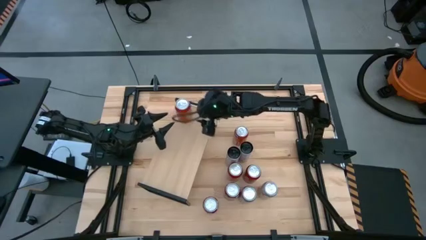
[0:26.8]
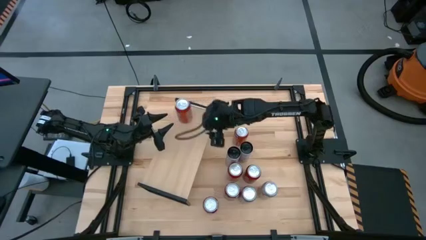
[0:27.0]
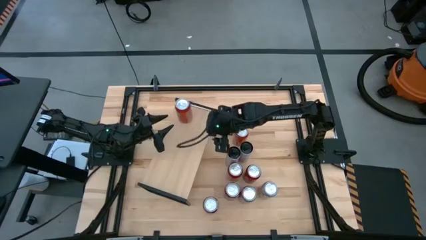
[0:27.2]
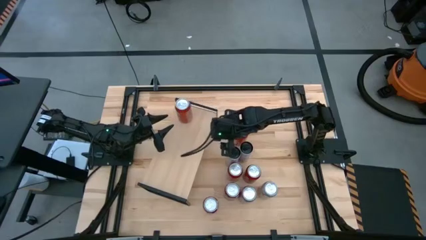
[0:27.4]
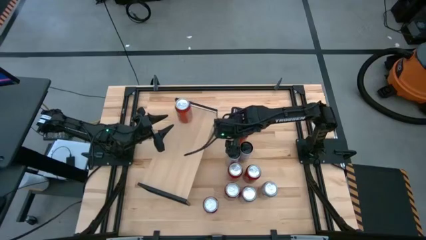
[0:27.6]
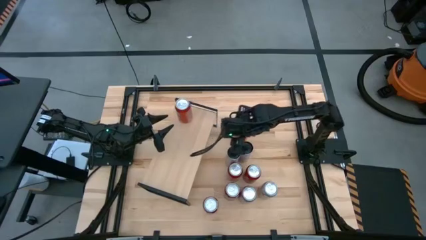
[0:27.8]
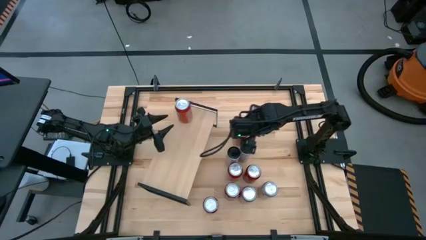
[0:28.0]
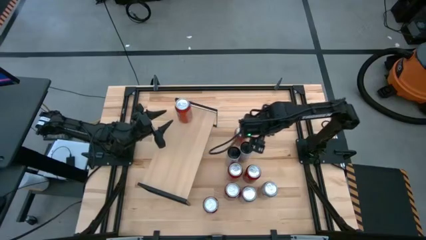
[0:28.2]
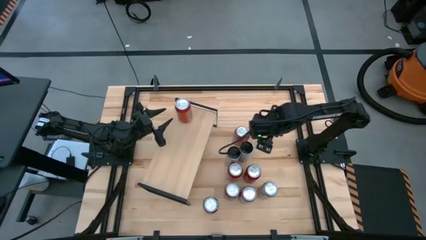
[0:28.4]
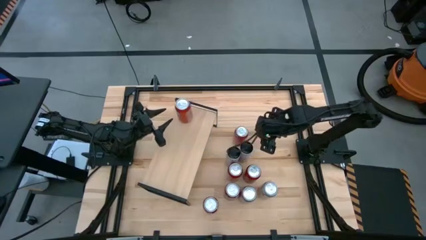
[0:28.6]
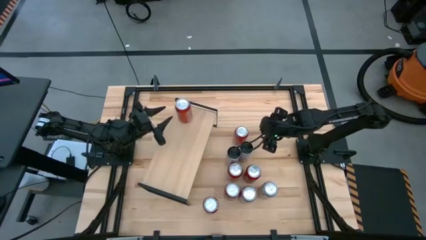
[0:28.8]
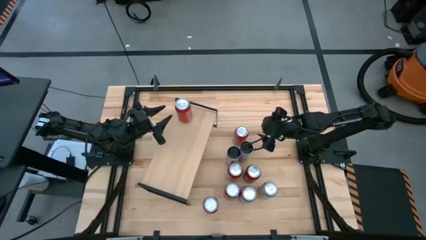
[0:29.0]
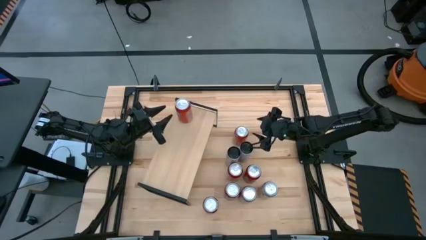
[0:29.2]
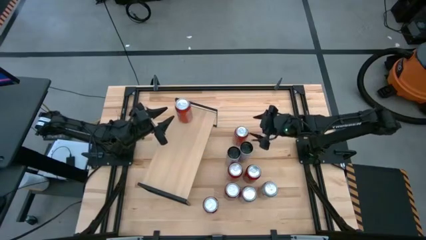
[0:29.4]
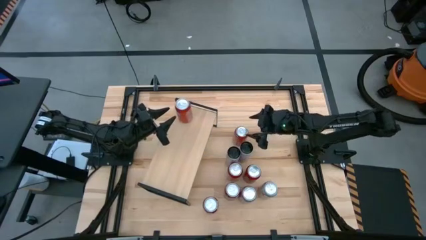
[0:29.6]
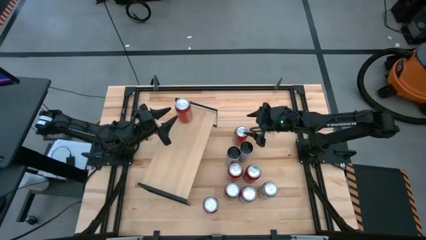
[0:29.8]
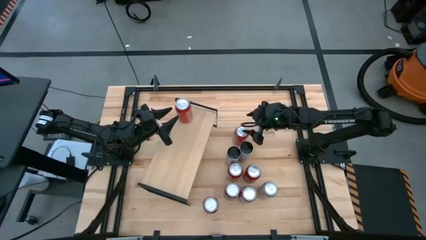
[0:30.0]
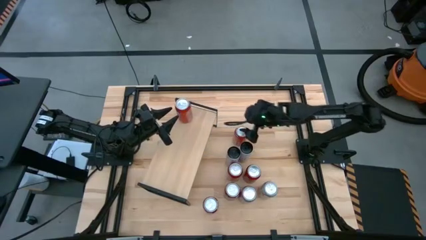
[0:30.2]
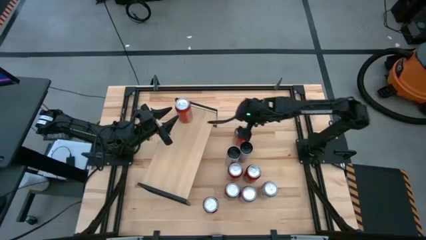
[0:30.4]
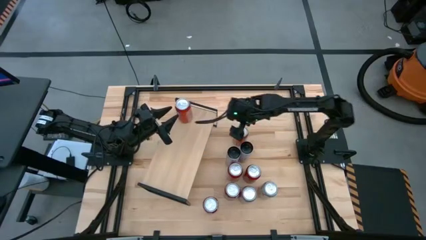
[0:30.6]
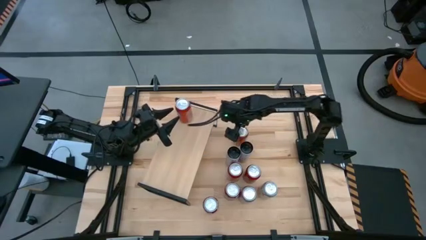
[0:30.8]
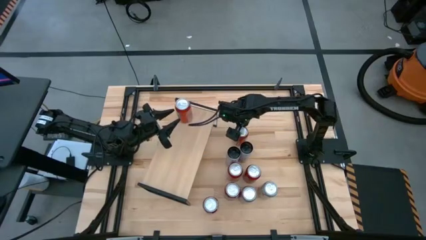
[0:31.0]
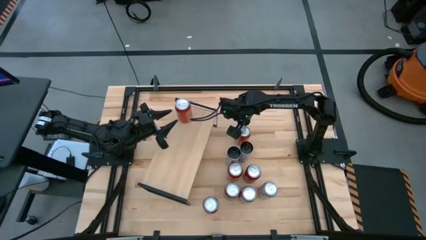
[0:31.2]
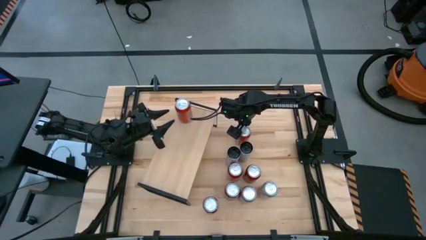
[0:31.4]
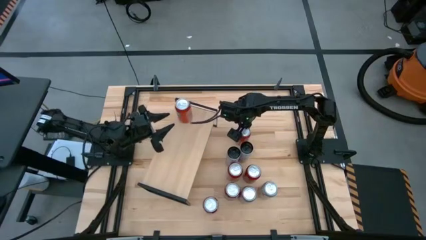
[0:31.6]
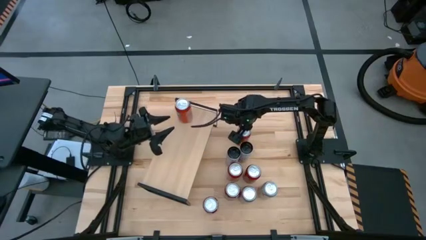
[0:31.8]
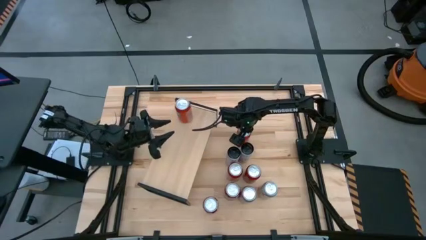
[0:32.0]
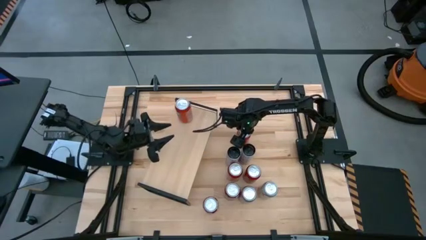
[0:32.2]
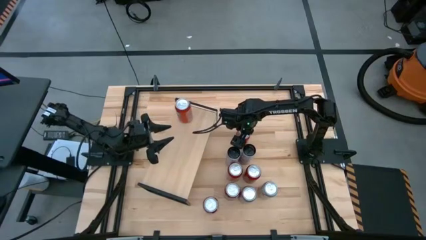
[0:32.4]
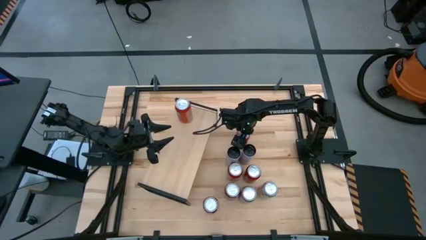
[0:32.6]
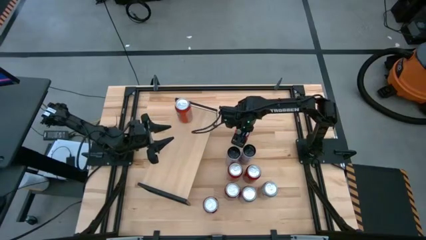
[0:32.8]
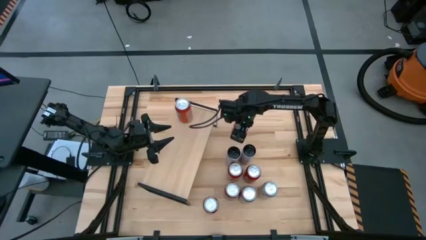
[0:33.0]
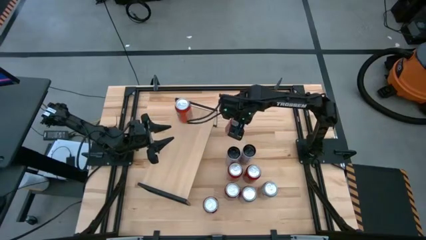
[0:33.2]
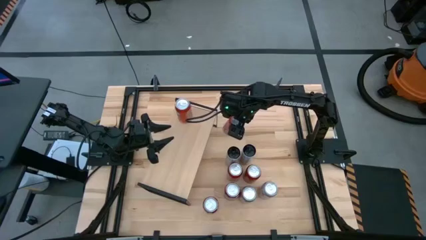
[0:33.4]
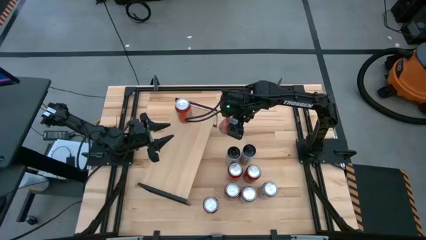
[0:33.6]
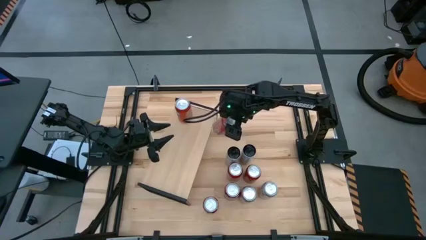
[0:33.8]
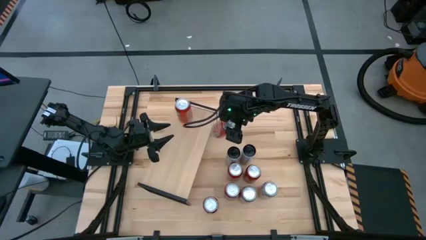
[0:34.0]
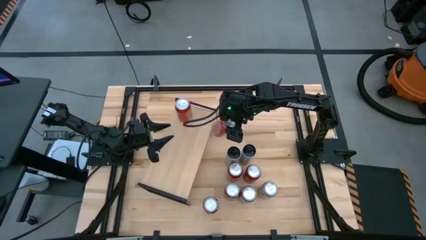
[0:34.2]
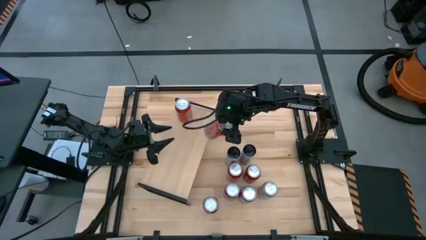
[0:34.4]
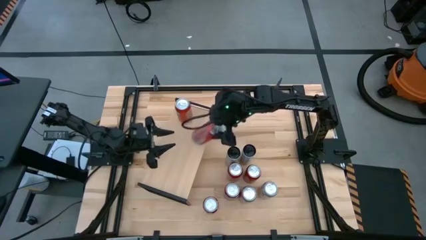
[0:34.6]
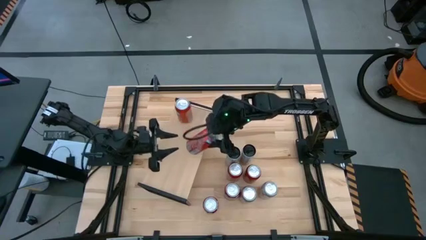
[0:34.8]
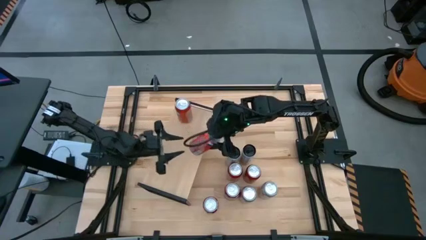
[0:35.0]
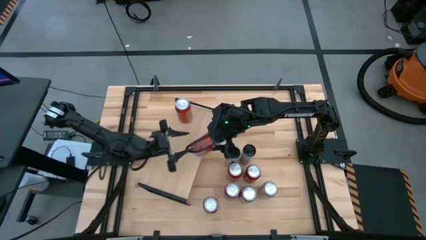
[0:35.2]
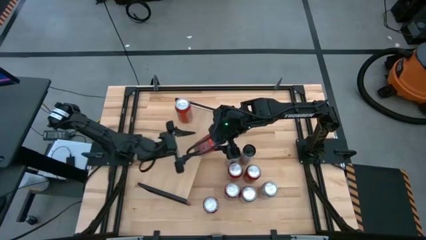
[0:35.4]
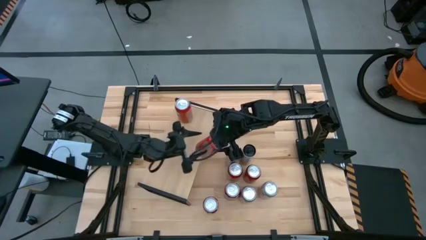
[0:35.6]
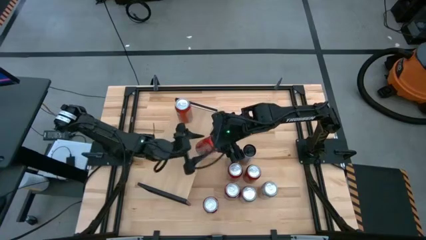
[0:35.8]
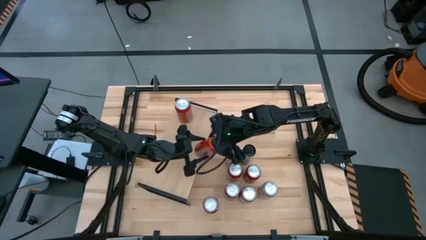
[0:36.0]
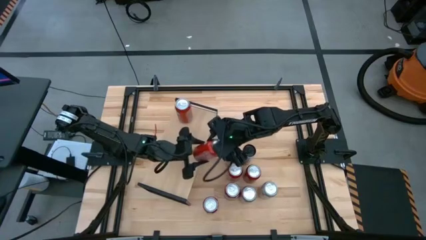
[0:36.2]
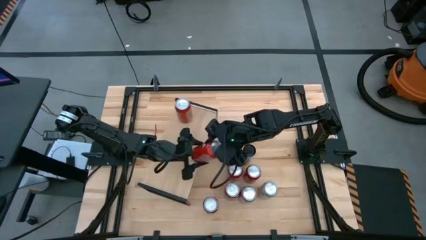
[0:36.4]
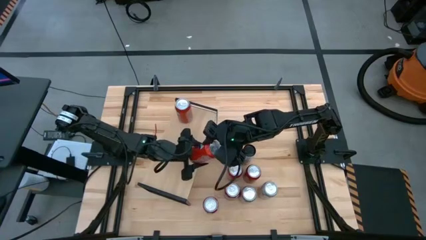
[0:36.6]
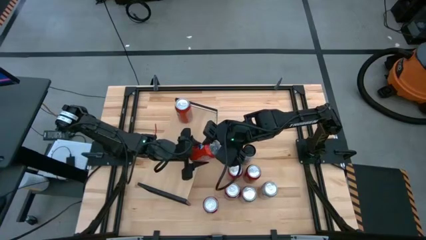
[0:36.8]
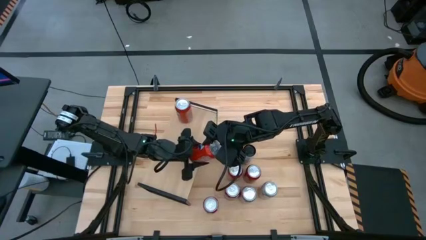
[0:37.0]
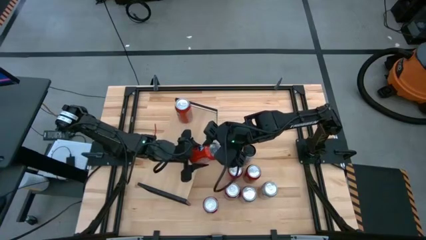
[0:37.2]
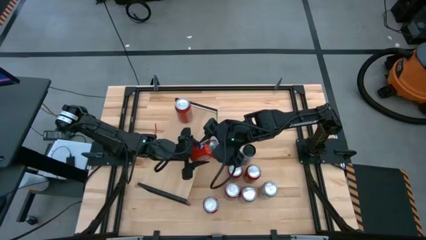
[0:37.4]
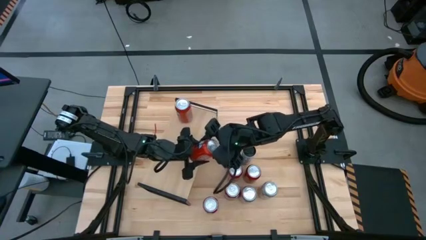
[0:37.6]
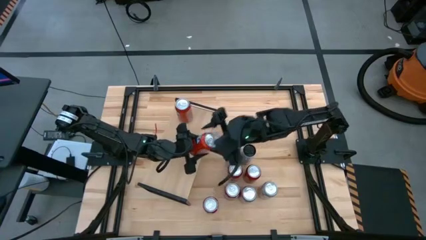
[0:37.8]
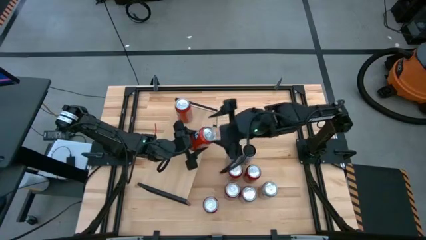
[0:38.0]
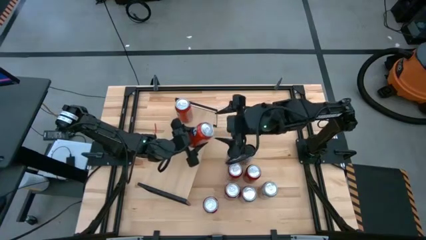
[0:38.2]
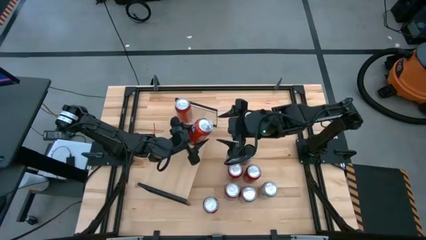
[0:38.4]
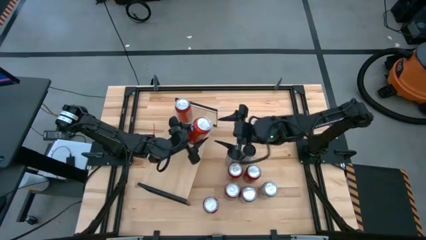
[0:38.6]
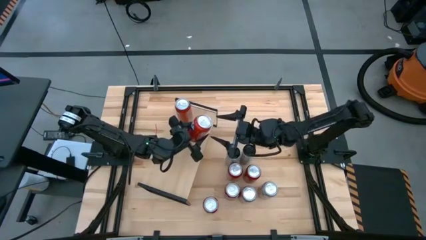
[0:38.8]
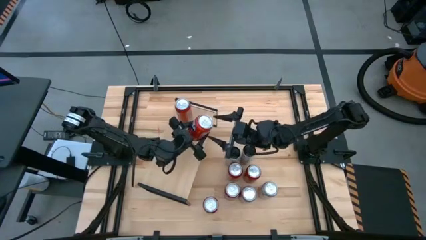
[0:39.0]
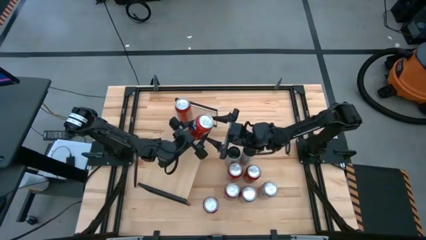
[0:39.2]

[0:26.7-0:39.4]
Task: Place canned beverage on shelf
Put the orange soda can on the shelf
